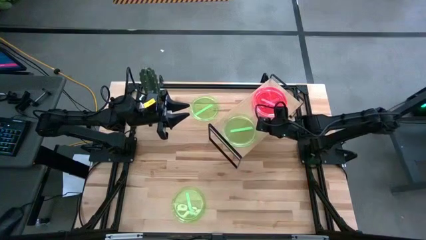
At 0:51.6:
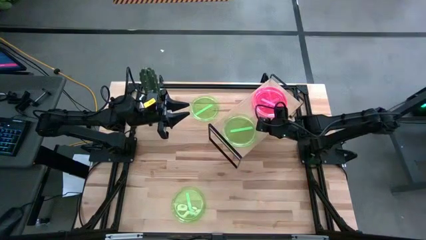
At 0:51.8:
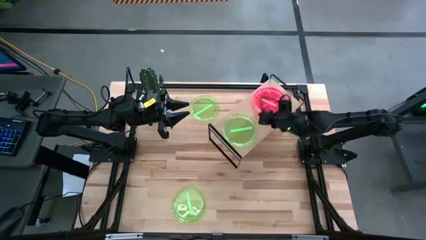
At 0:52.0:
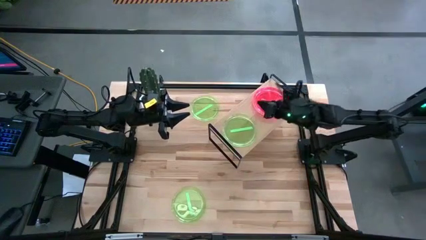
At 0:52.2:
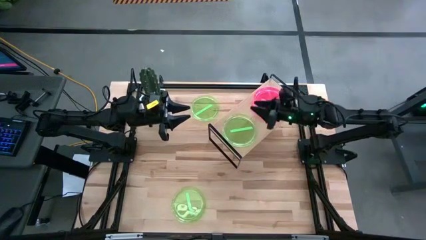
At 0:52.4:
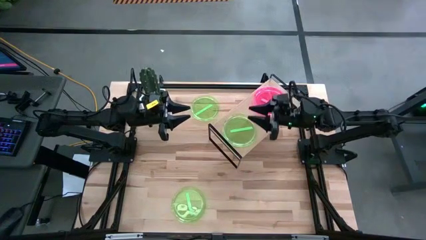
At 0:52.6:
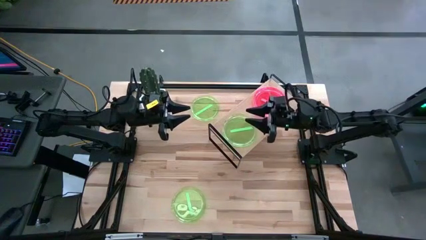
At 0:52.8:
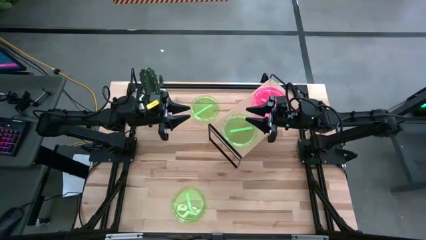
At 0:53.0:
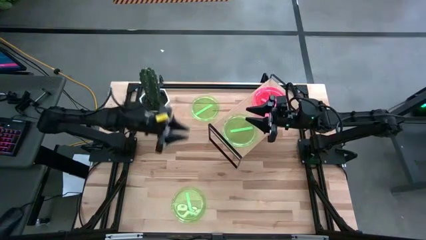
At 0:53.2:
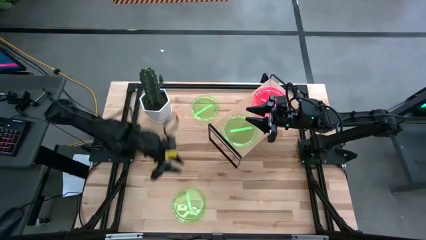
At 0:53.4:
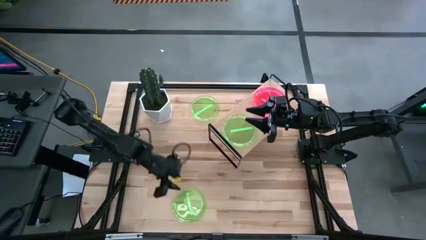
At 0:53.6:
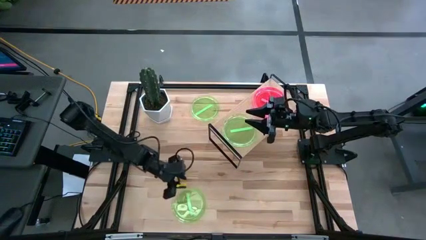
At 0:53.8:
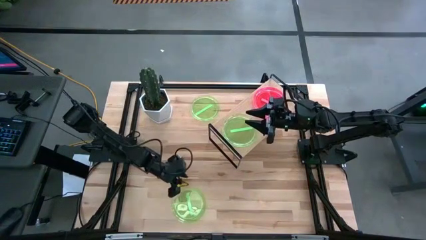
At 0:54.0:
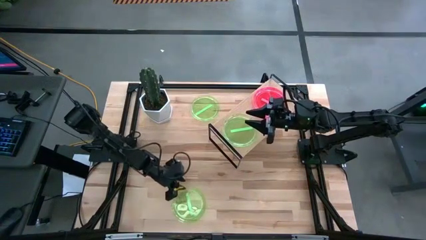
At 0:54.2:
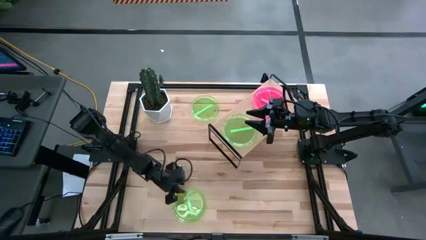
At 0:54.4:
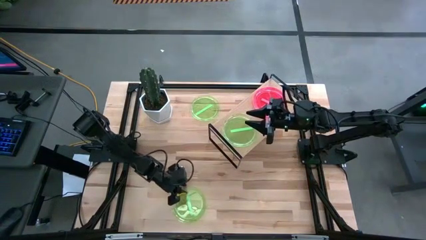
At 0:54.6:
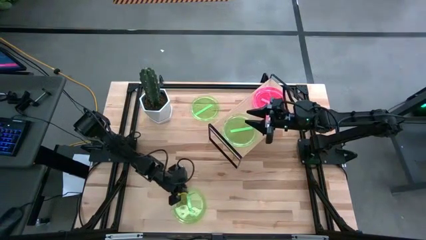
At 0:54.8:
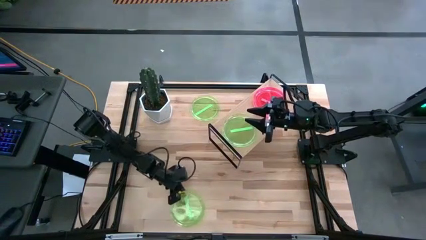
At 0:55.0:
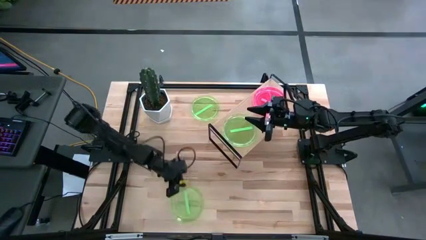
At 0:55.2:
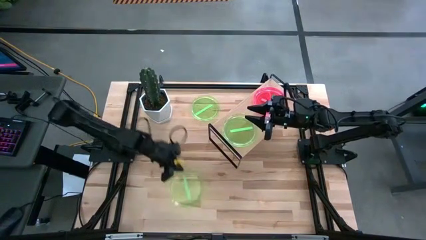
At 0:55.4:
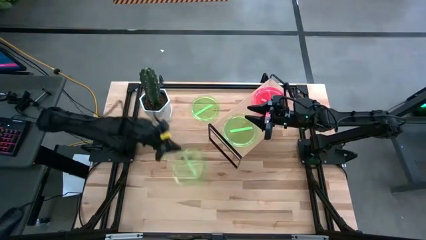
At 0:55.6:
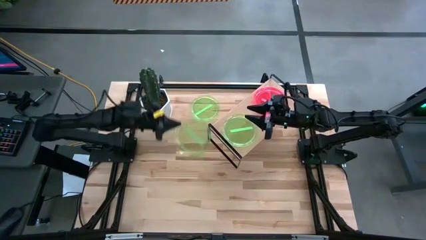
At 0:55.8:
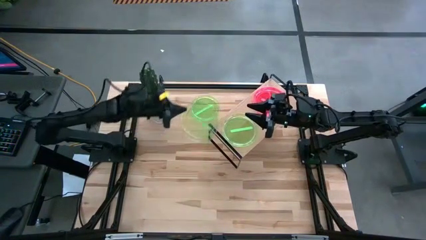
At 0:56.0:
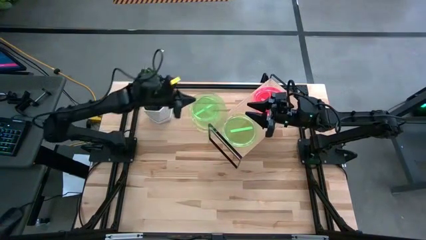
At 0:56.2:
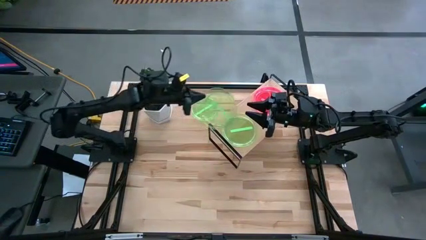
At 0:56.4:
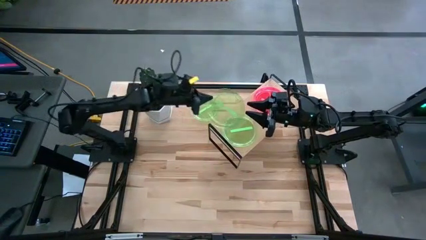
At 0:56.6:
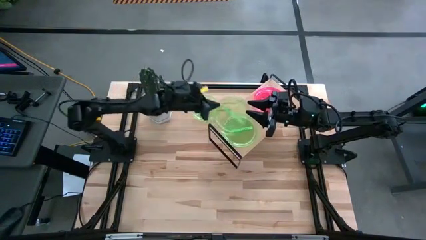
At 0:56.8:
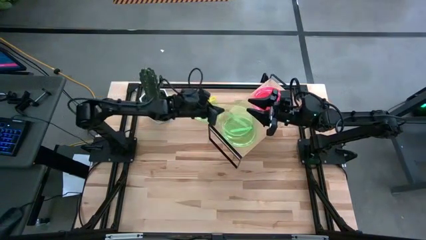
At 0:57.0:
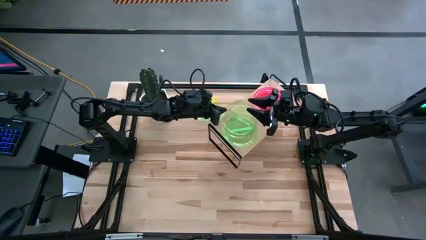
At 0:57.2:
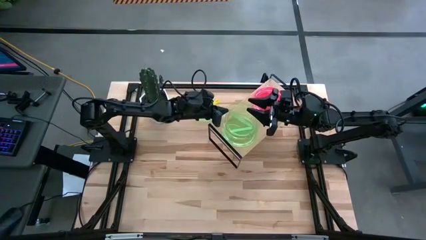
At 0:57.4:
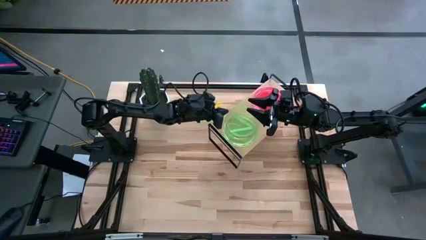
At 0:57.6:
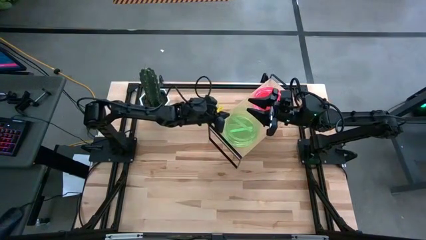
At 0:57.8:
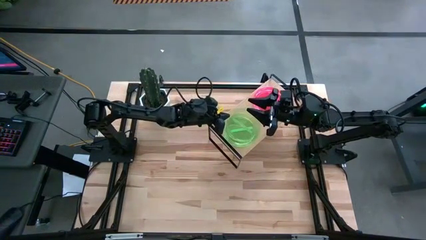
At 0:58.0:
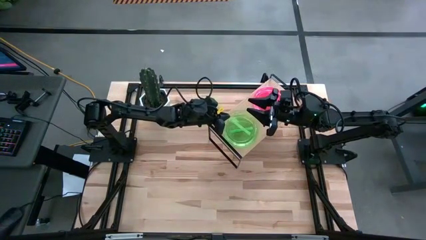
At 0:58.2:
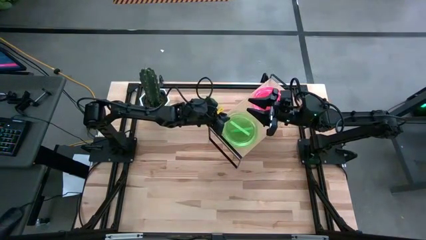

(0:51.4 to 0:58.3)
Task: Place and stack plates onto a shelf
Stack the bottom green plate on the top of the green plate

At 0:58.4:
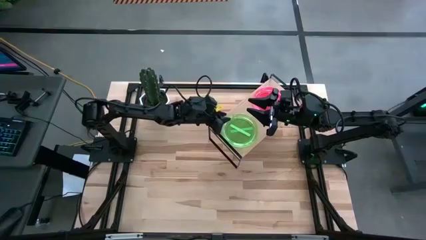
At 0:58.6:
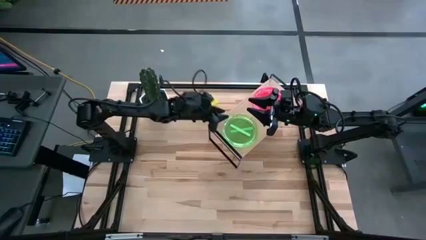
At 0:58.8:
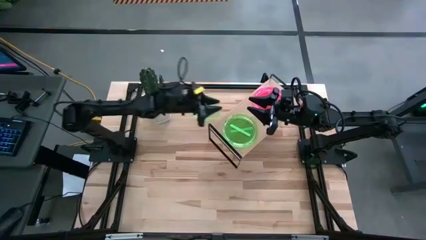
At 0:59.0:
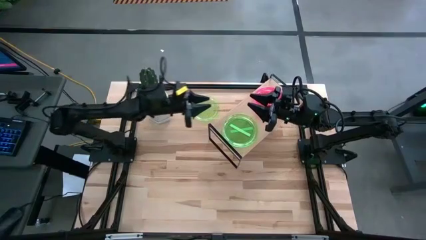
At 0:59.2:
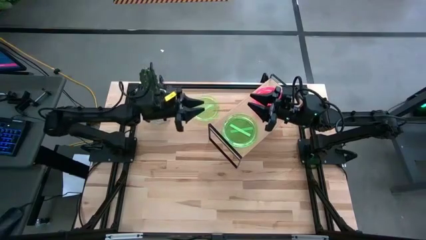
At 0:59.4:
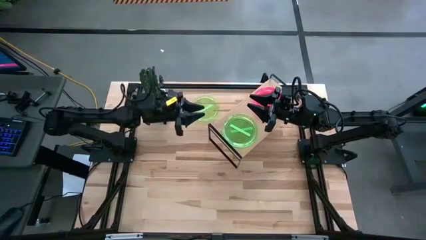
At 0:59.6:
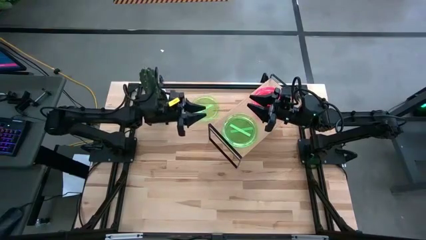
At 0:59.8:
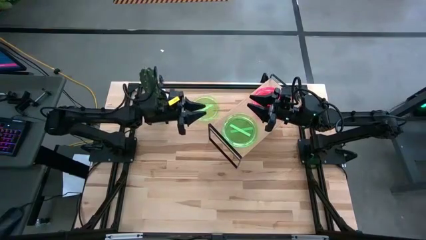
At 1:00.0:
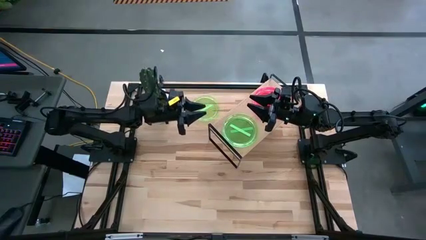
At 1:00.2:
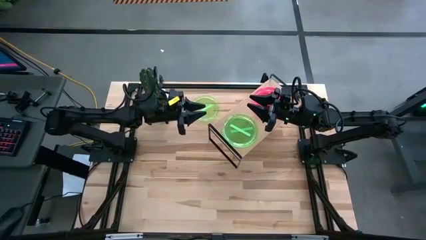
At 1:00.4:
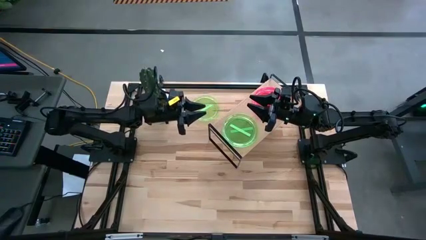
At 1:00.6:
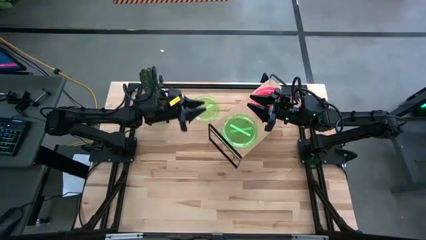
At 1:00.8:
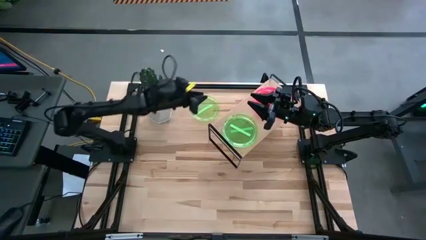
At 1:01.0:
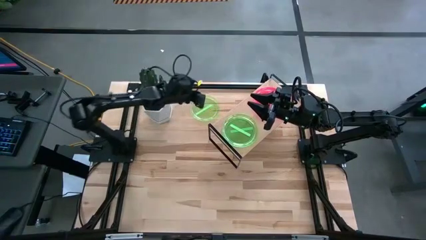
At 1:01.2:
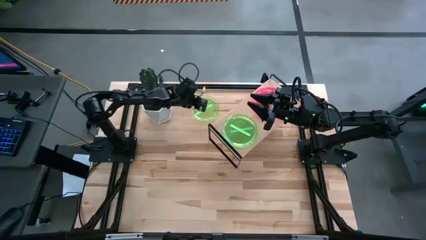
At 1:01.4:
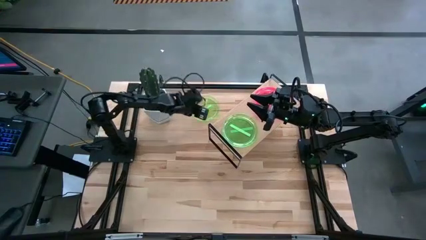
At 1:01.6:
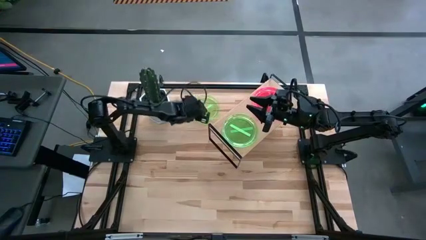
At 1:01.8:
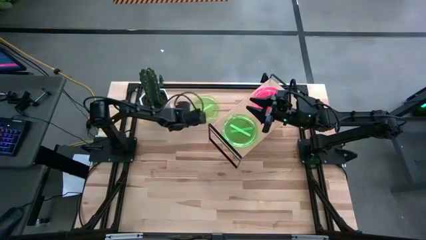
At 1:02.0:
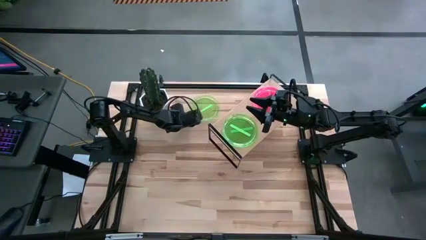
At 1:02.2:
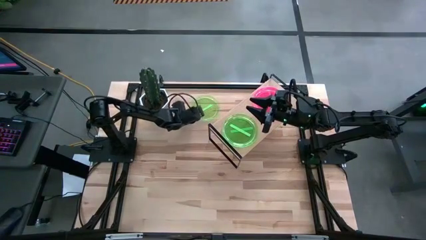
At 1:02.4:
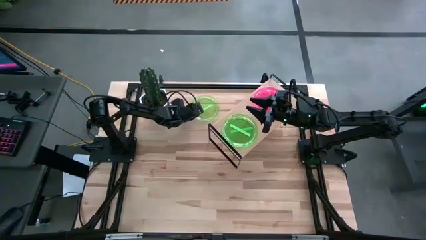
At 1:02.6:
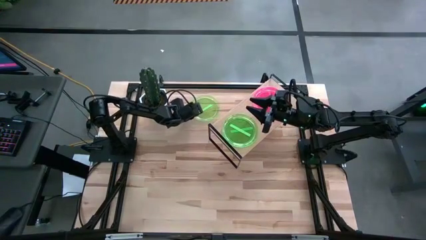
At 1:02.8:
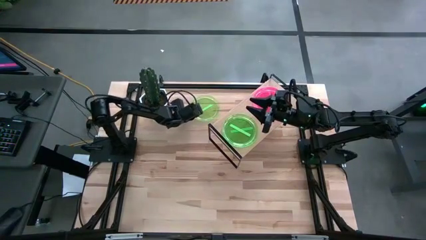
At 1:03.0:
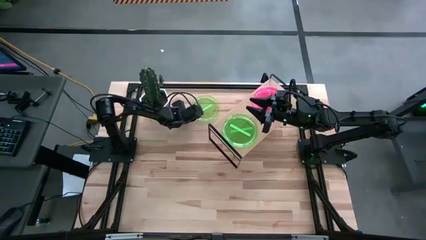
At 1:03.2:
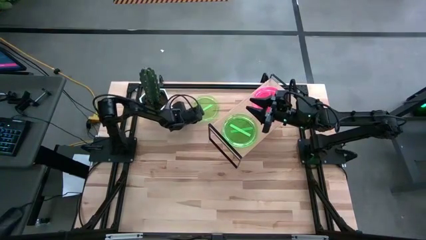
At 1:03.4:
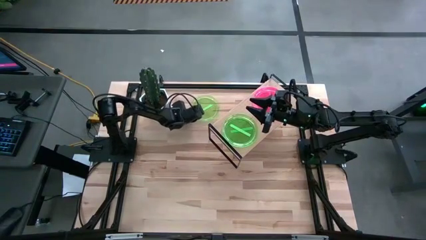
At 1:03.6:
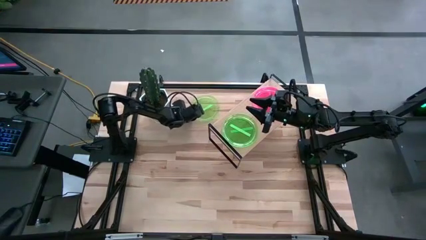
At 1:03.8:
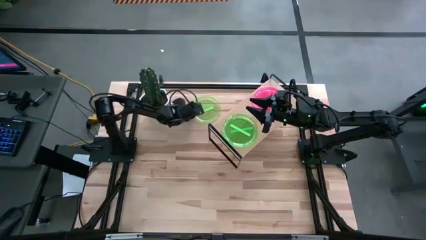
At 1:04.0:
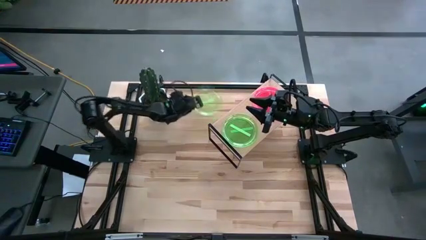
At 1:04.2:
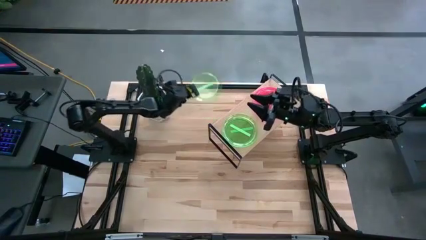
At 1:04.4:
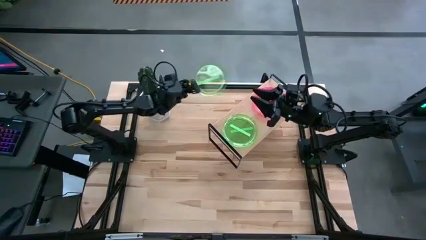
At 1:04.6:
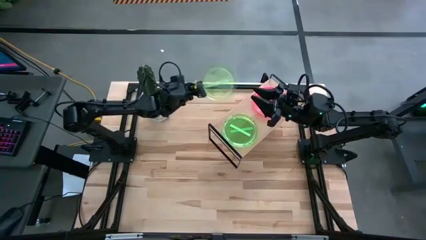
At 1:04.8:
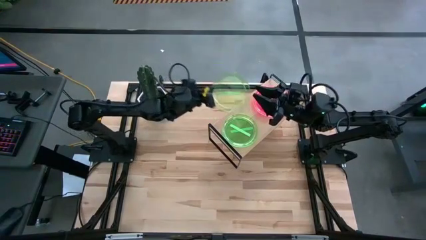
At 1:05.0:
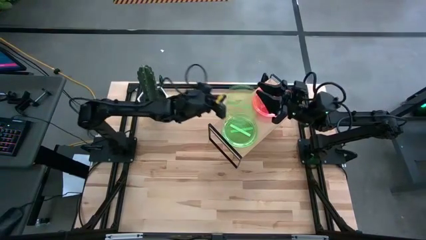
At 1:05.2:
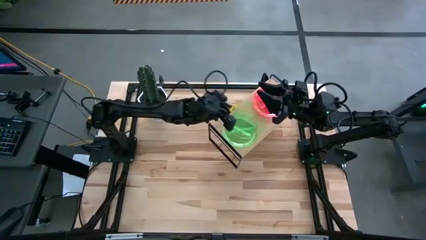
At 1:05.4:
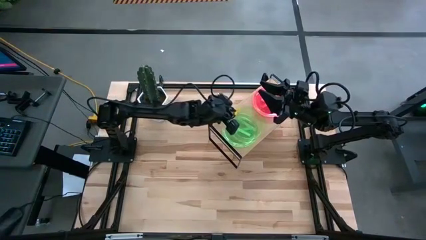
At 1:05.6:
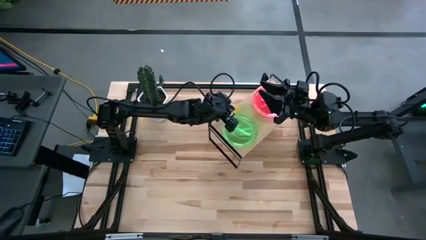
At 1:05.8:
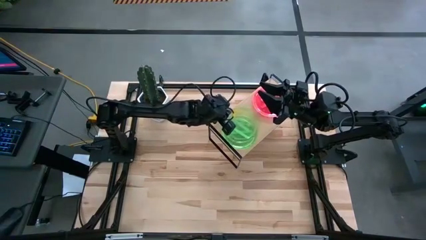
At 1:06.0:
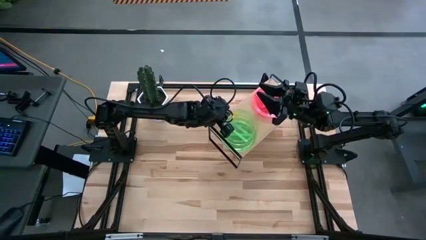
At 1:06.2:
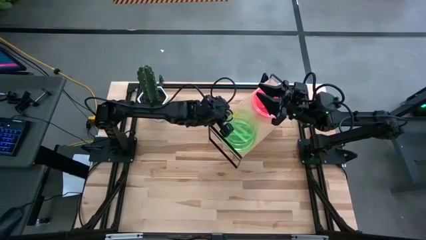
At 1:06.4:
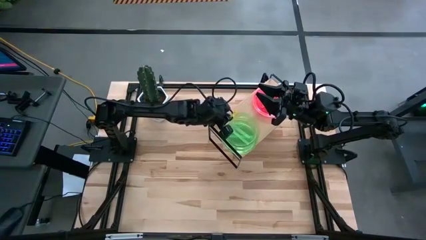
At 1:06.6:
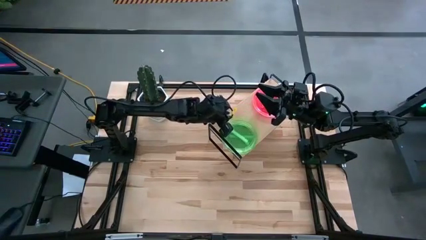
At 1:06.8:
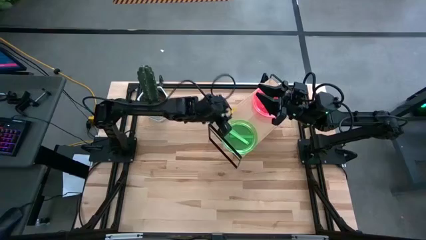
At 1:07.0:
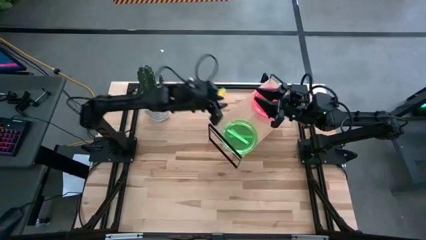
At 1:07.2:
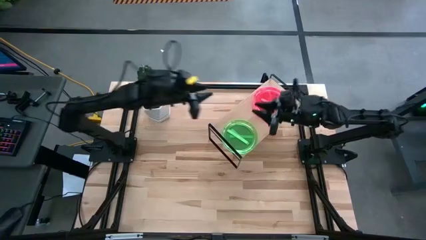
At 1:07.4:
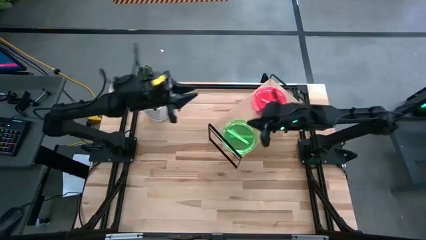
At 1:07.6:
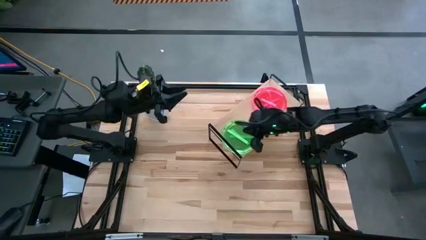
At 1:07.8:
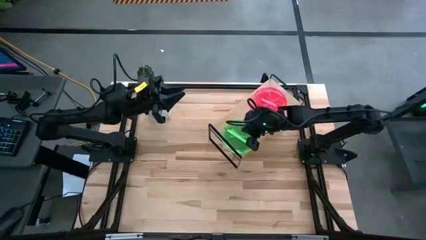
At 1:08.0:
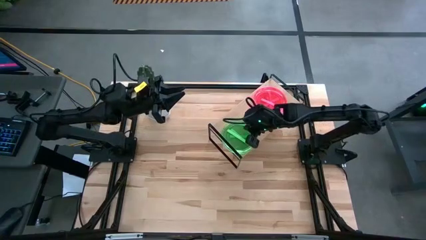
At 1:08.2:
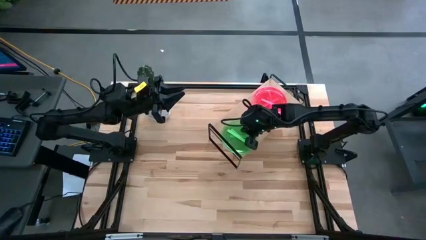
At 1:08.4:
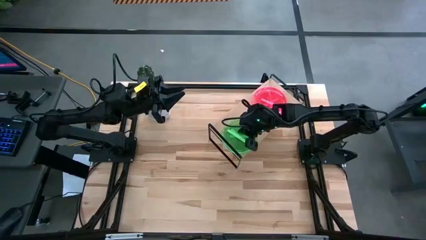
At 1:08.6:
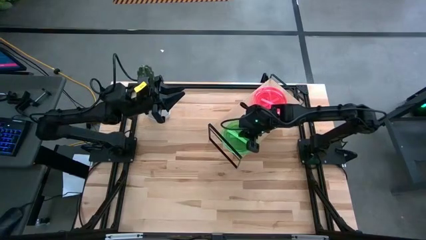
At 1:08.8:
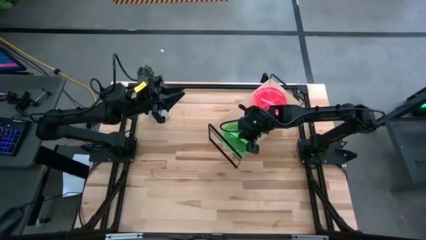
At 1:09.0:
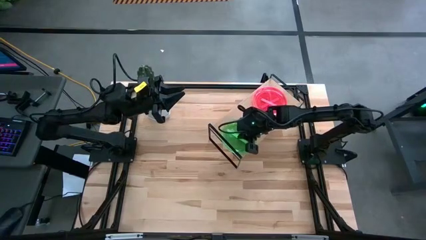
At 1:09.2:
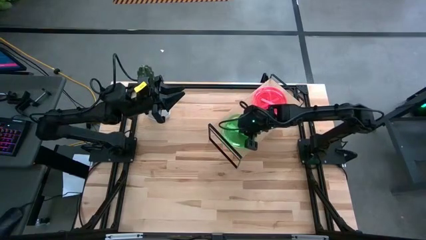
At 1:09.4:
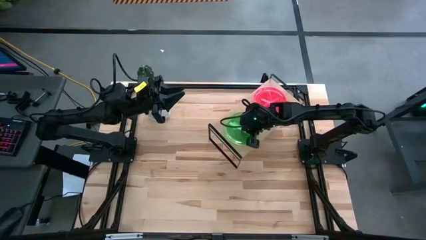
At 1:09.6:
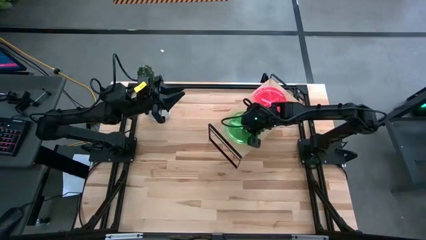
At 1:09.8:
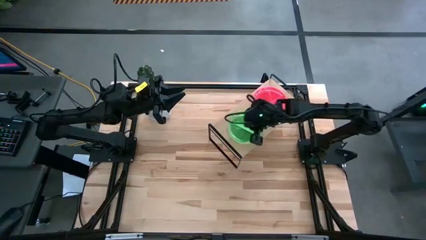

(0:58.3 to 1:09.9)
Stack the green plate on the top of the green plates
